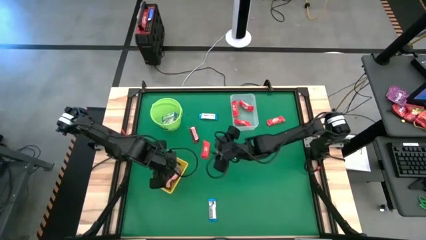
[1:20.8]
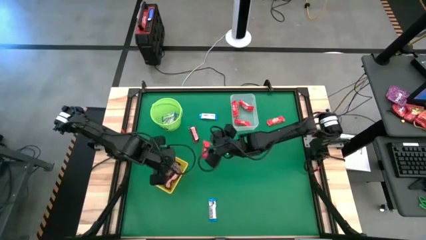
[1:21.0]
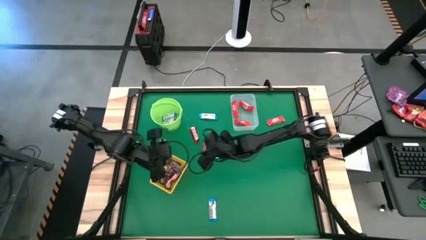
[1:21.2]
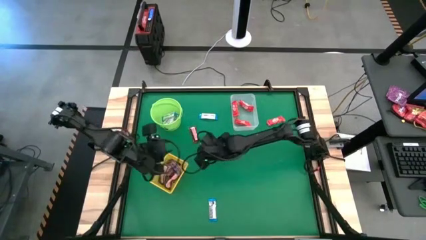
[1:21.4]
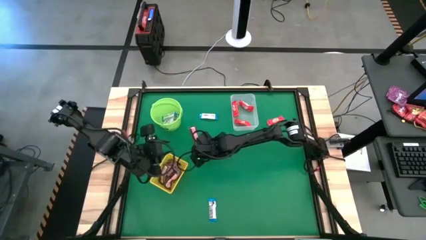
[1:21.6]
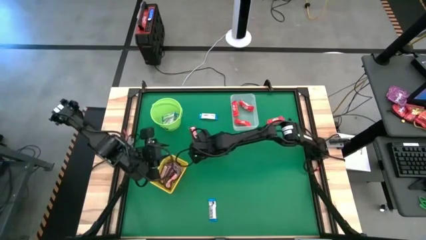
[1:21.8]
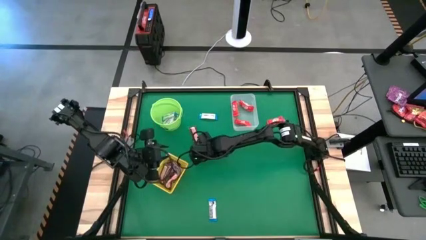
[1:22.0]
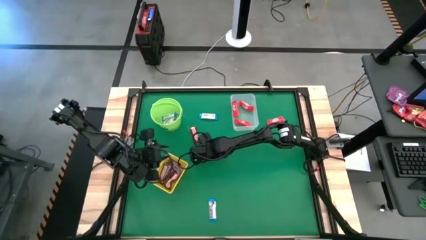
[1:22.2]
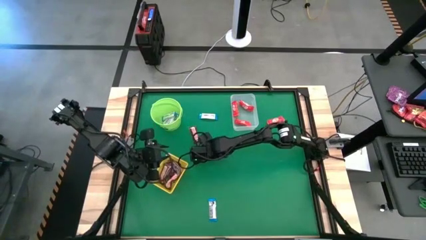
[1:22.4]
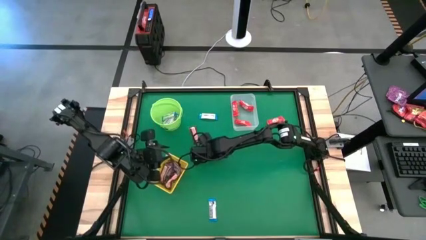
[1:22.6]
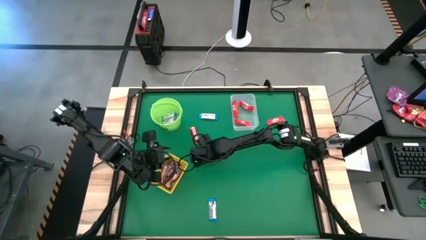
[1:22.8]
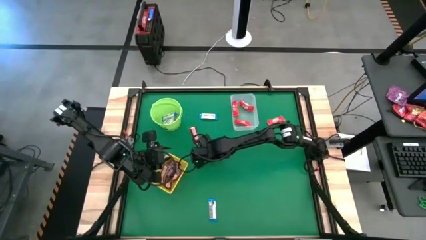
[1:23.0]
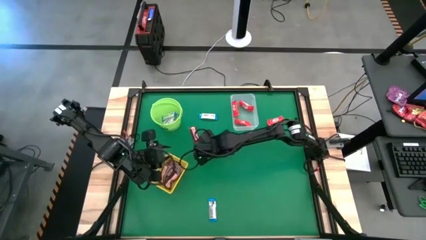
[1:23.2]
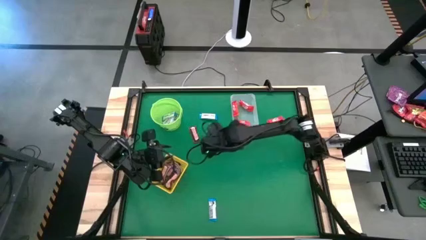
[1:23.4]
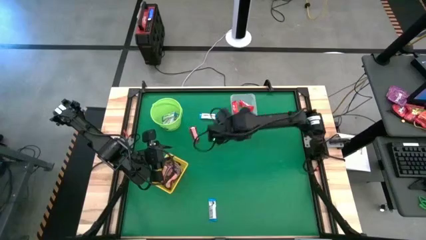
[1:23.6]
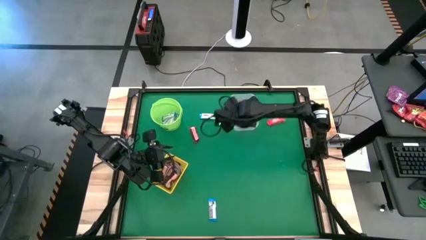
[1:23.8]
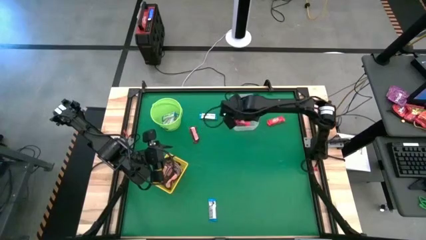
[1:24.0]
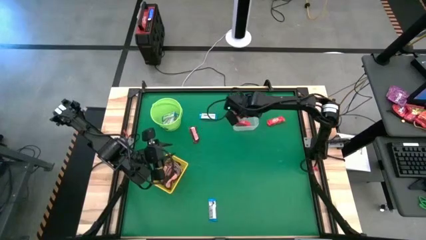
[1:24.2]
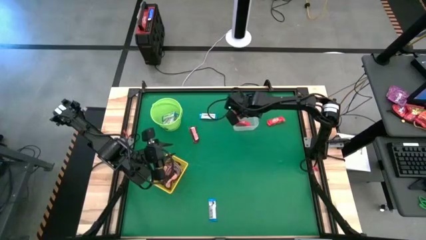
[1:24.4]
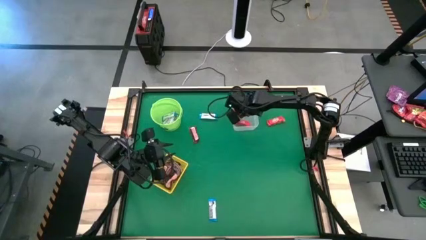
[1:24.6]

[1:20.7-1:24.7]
Task: Sort candy by brand, put in halloween buckets
Put the red chocolate into the transparent bin

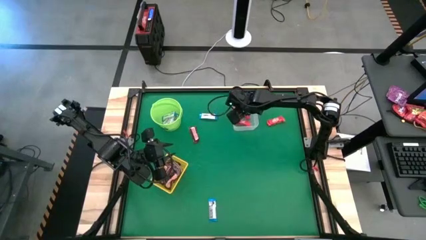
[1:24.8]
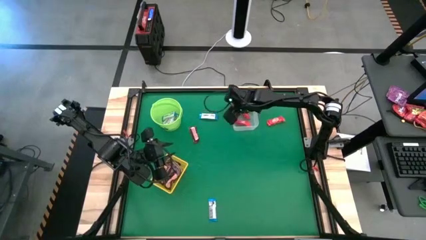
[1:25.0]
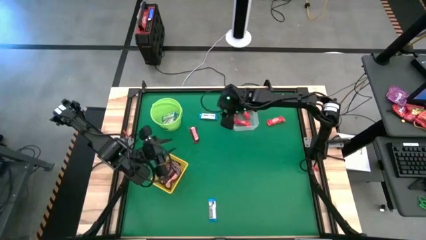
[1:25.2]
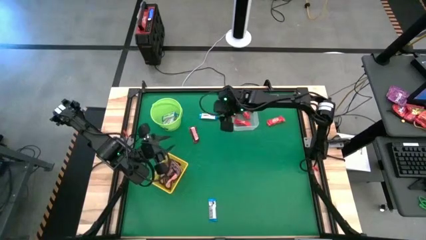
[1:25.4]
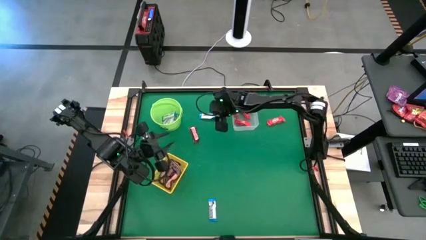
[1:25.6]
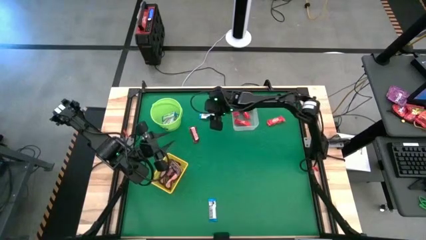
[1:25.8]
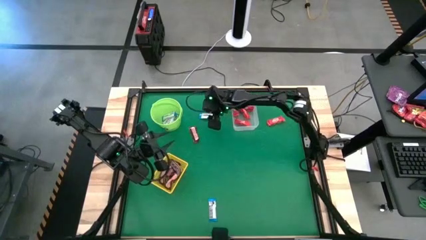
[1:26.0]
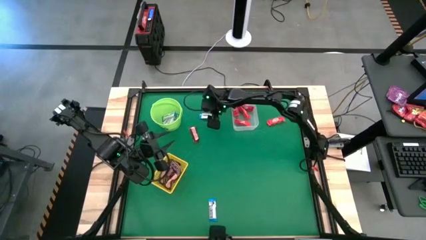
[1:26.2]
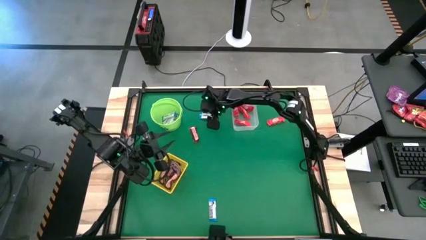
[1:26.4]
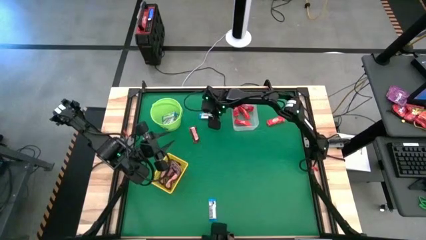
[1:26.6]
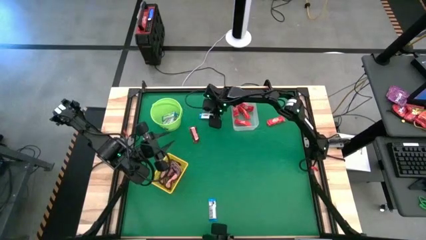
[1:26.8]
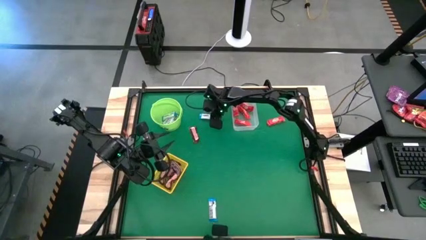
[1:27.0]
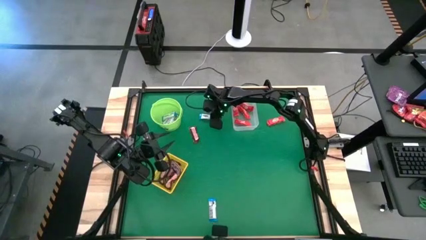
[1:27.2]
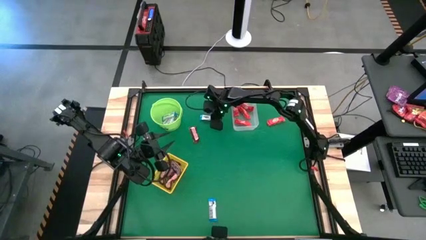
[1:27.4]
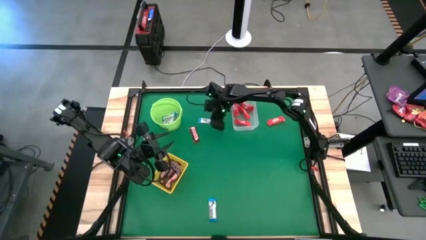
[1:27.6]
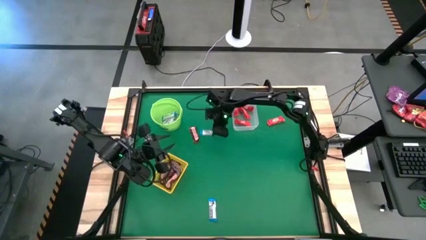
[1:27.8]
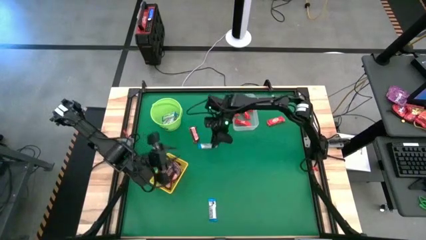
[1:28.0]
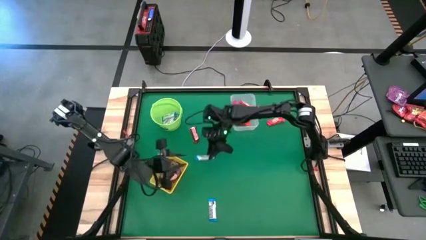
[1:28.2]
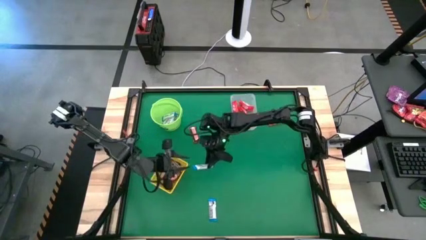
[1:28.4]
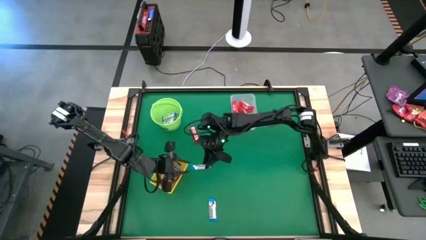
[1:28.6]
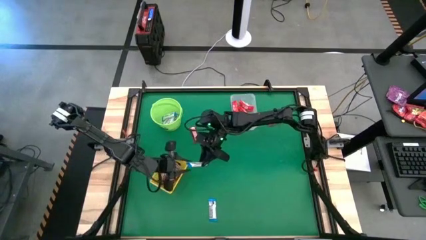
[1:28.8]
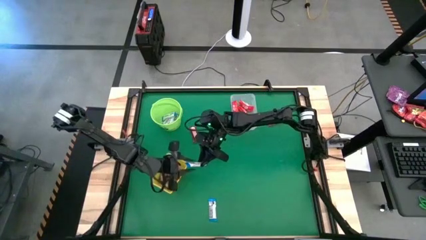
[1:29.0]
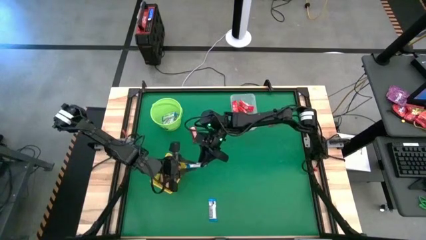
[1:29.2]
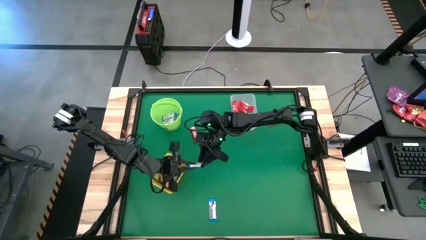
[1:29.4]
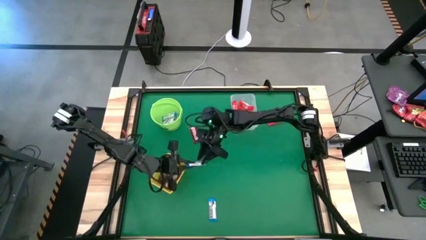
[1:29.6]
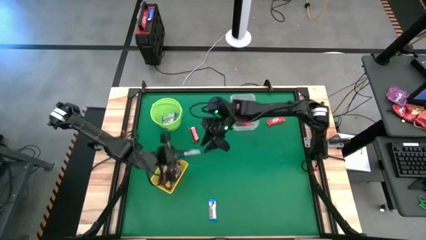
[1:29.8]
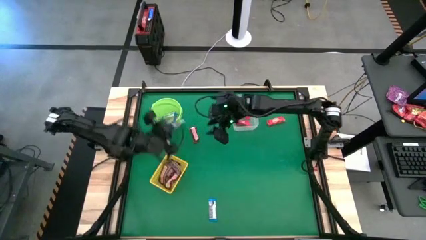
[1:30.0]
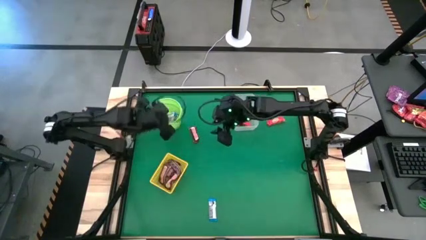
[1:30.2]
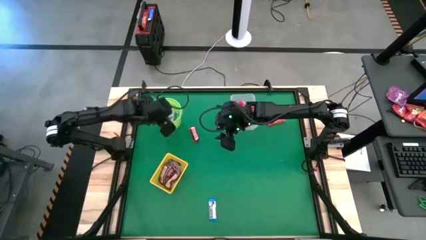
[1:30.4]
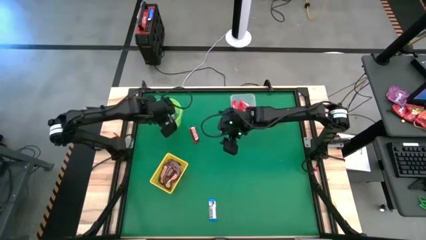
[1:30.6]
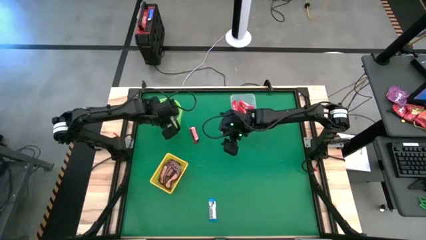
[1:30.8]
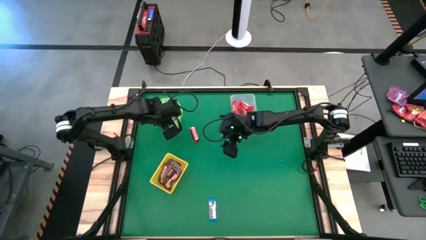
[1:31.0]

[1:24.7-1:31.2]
Put the white chocolate into the green bucket

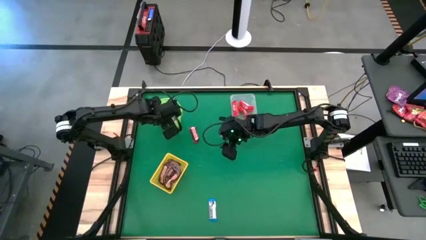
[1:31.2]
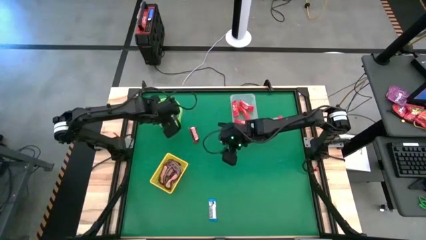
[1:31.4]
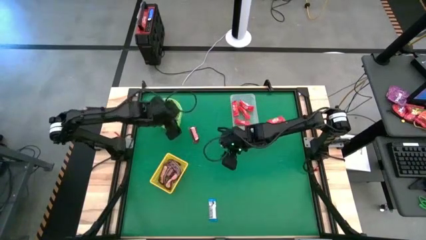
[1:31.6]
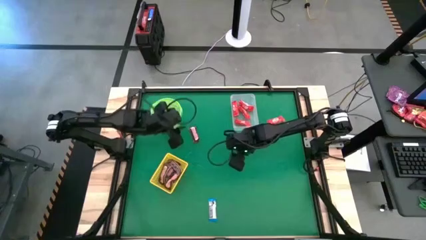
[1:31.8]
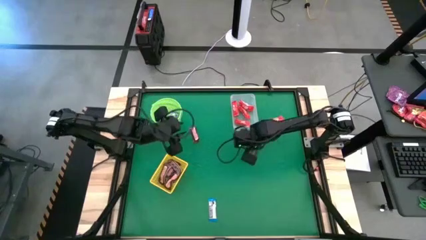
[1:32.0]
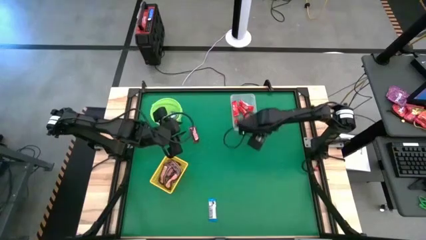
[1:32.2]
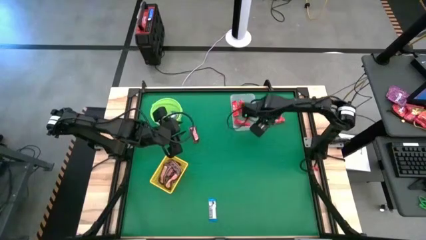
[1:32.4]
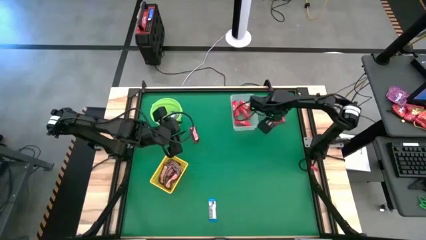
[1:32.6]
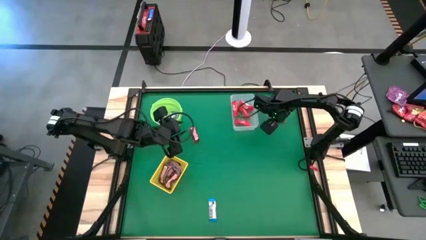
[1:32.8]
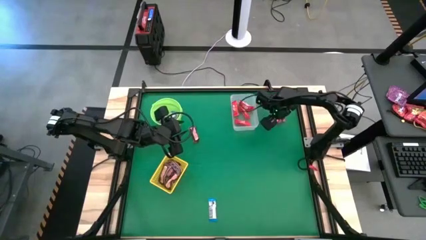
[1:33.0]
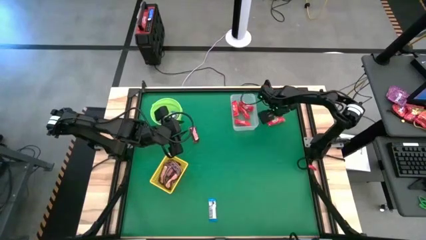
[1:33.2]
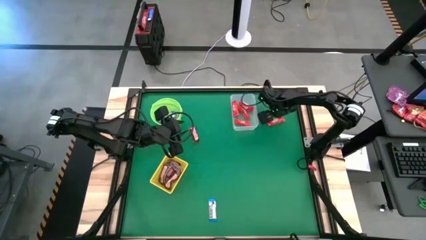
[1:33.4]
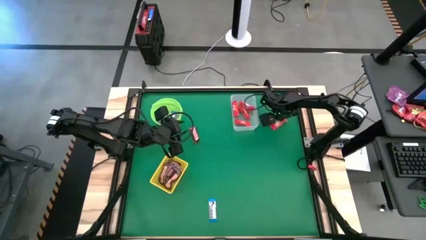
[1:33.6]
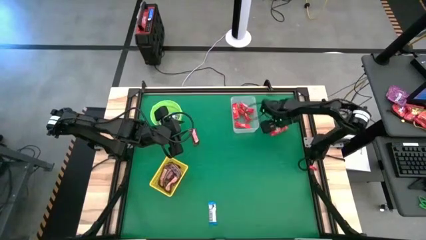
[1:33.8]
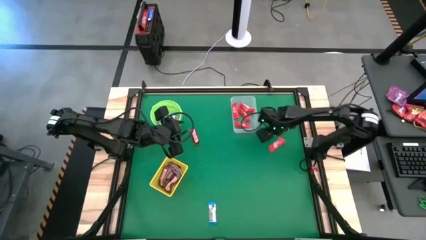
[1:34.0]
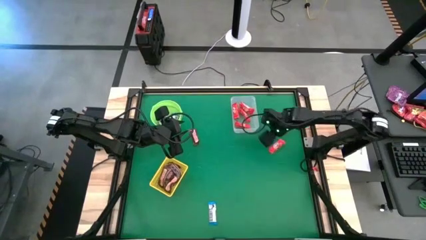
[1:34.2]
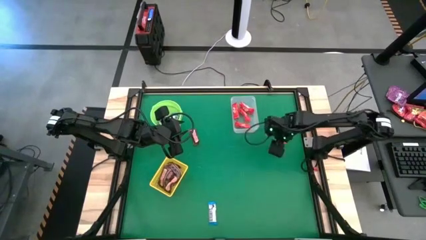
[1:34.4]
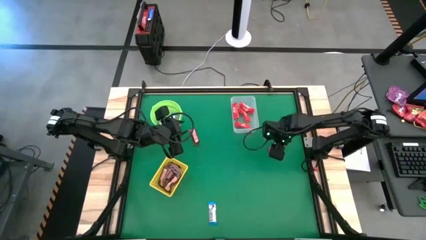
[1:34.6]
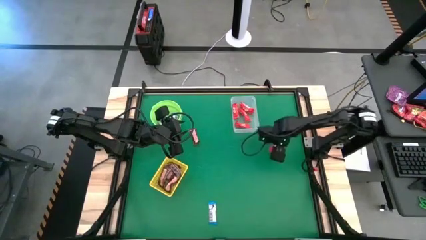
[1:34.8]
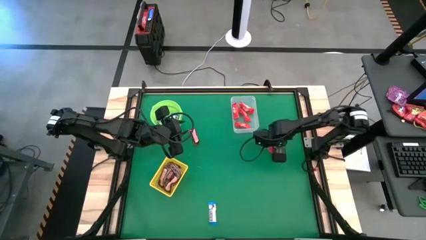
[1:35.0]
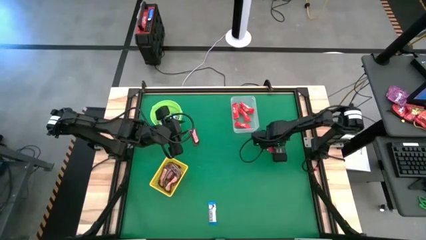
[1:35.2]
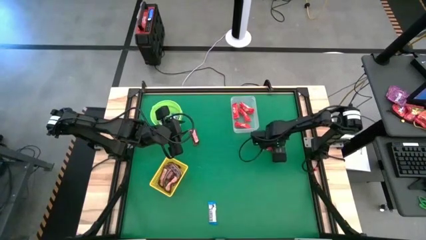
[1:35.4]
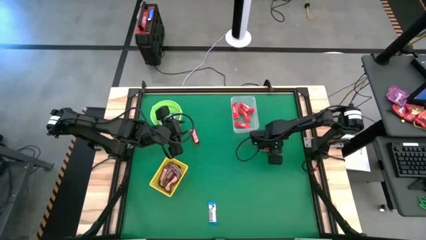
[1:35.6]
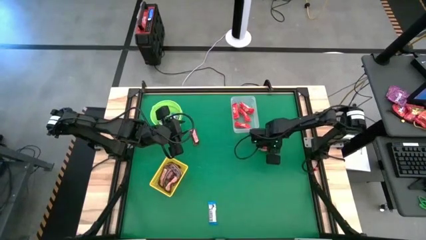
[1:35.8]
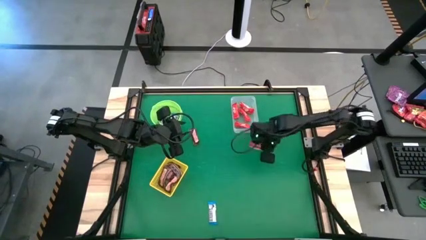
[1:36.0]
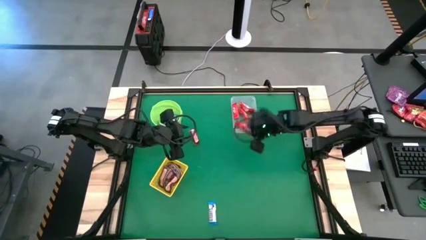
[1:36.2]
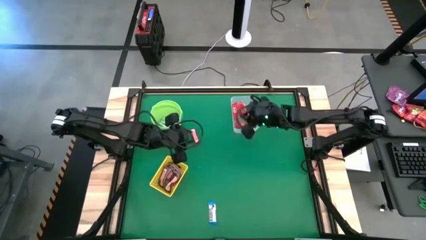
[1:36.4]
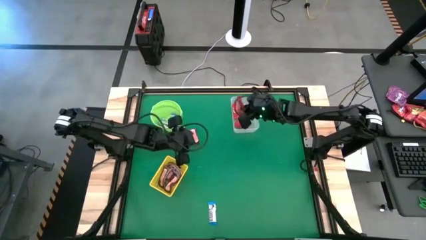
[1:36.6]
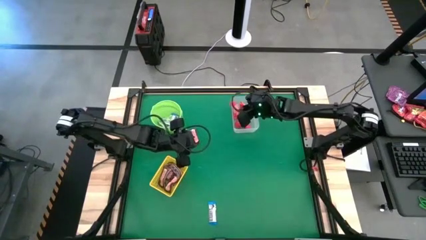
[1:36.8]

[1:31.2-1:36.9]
Put the red chocolate into the transparent bin
